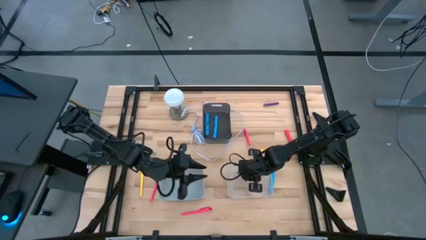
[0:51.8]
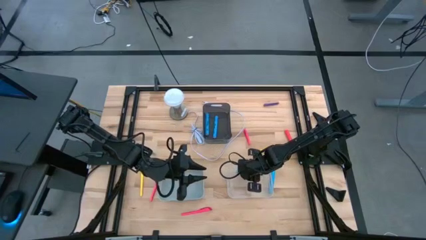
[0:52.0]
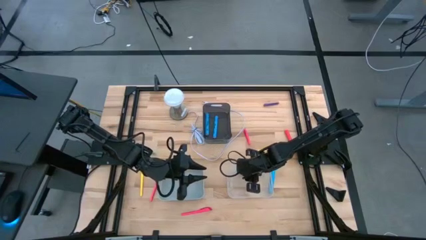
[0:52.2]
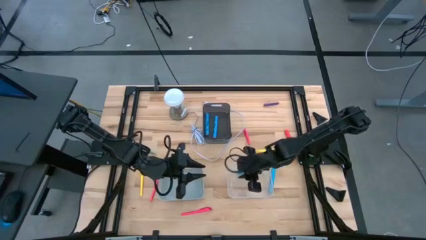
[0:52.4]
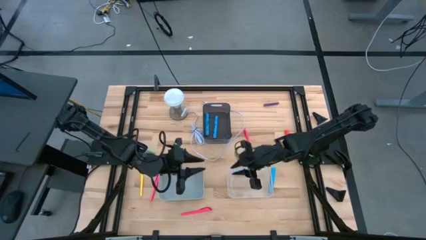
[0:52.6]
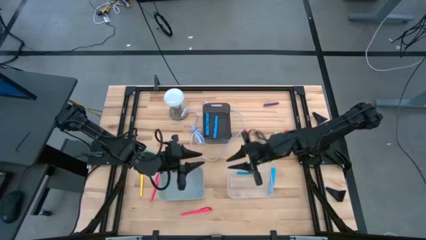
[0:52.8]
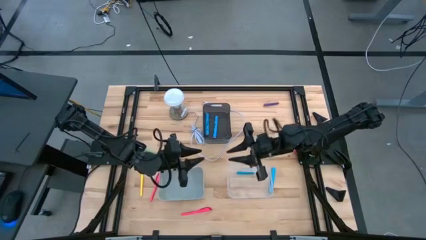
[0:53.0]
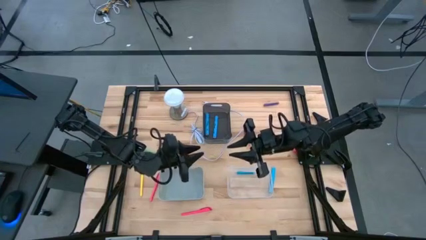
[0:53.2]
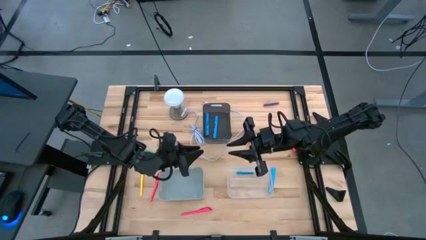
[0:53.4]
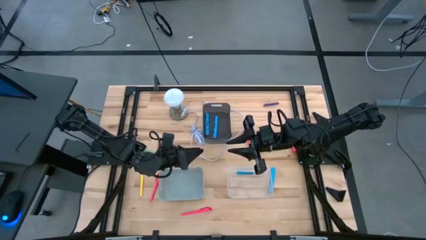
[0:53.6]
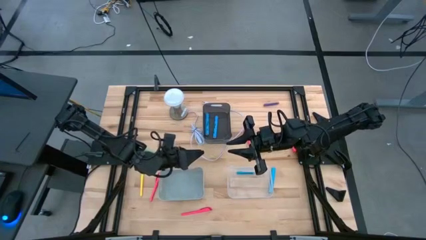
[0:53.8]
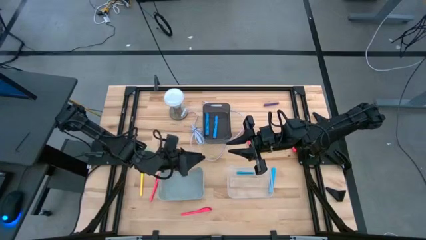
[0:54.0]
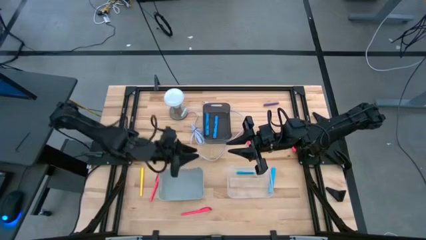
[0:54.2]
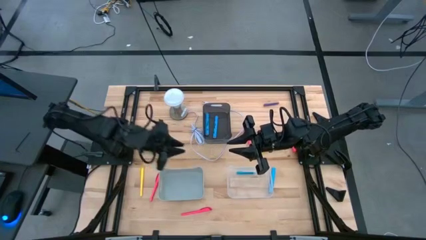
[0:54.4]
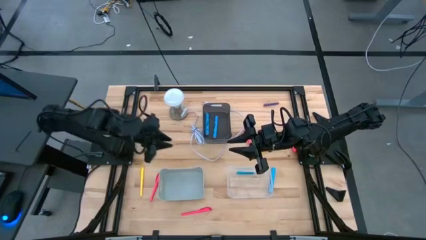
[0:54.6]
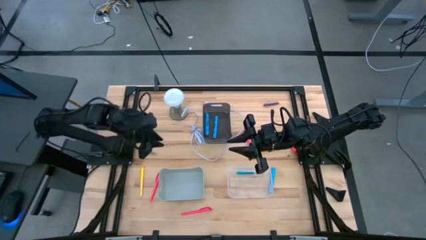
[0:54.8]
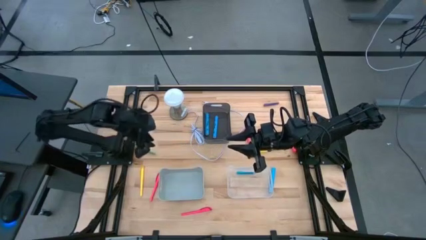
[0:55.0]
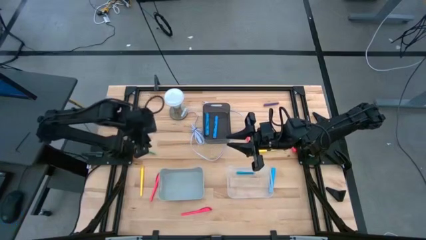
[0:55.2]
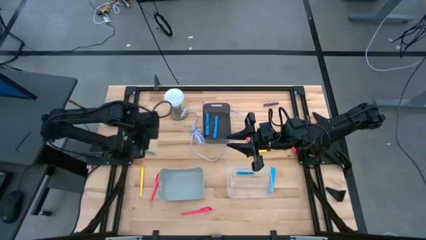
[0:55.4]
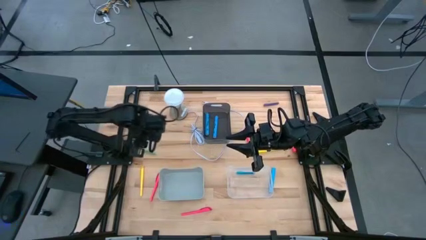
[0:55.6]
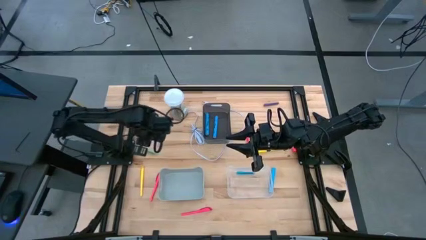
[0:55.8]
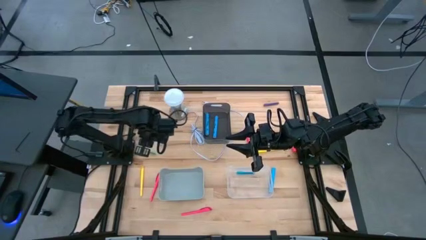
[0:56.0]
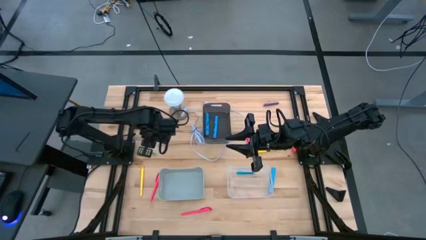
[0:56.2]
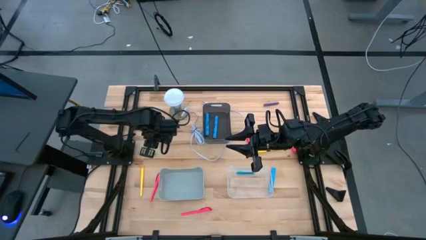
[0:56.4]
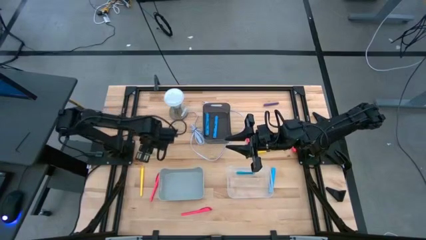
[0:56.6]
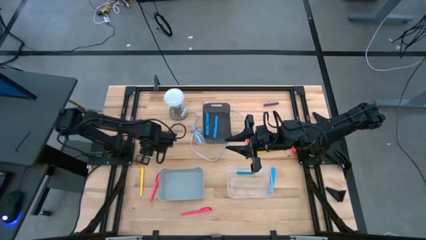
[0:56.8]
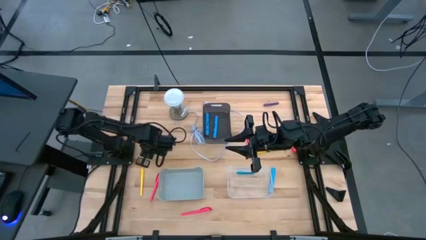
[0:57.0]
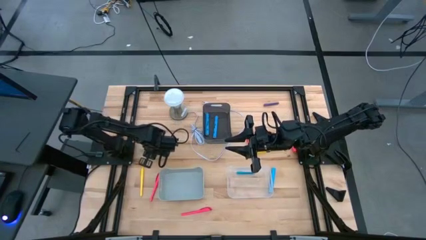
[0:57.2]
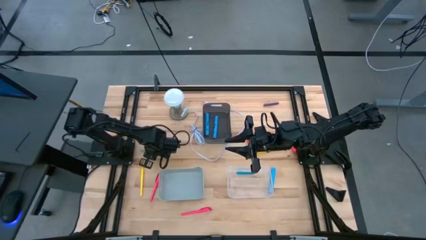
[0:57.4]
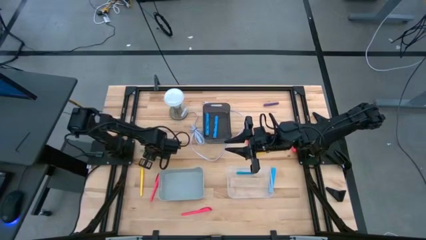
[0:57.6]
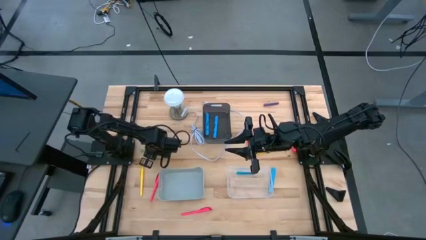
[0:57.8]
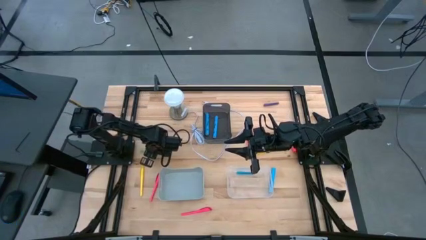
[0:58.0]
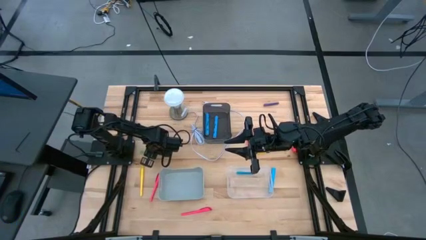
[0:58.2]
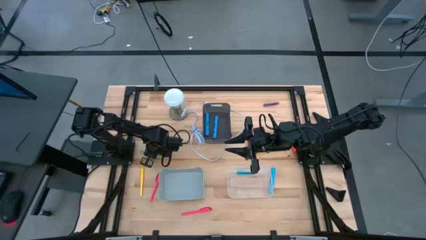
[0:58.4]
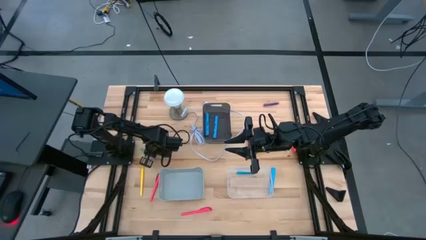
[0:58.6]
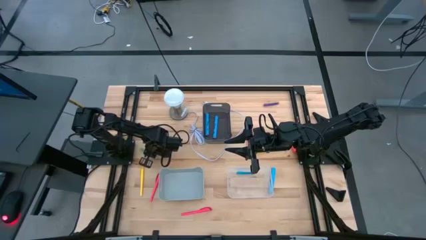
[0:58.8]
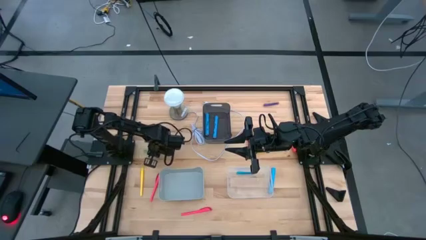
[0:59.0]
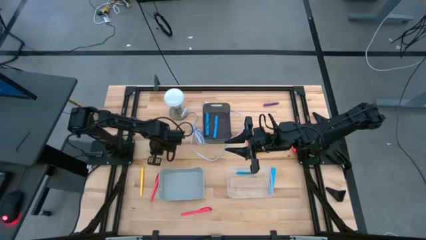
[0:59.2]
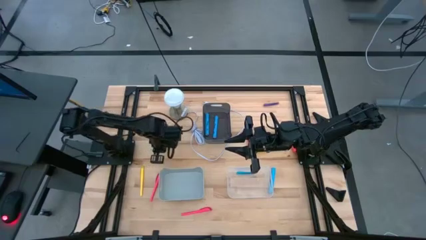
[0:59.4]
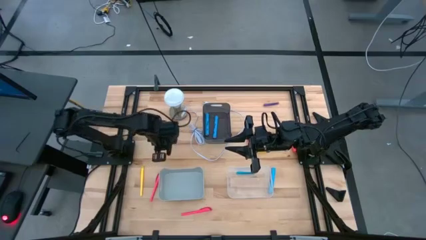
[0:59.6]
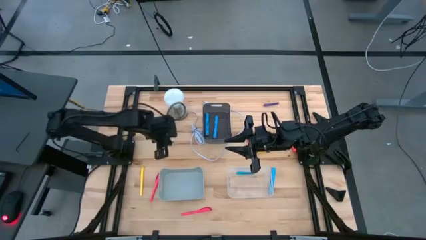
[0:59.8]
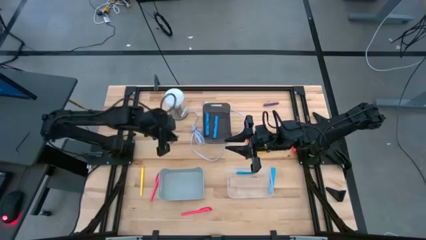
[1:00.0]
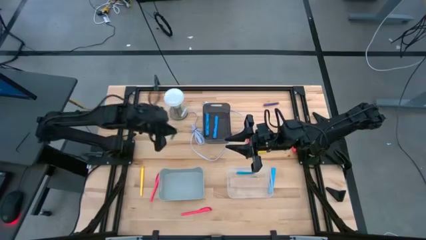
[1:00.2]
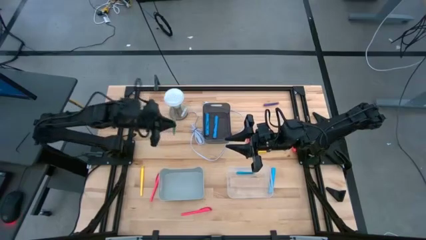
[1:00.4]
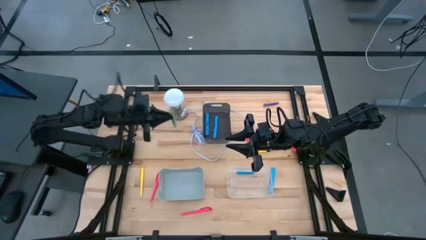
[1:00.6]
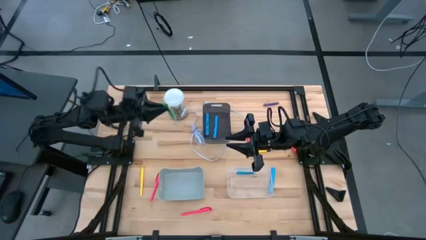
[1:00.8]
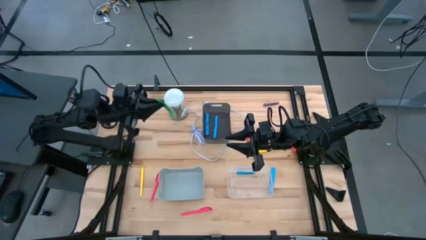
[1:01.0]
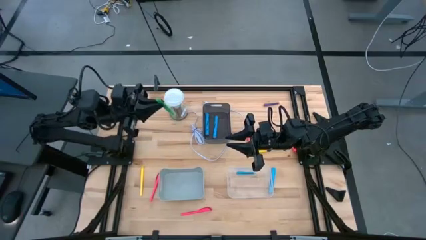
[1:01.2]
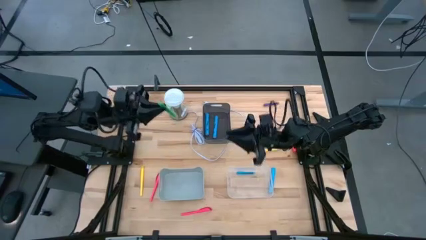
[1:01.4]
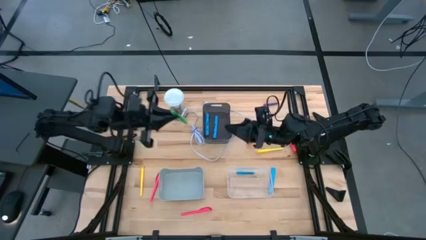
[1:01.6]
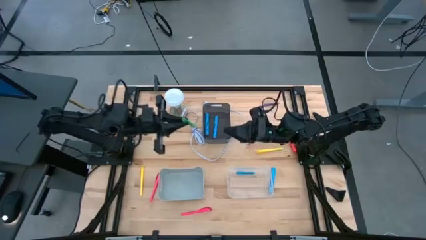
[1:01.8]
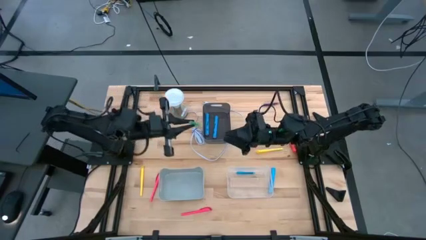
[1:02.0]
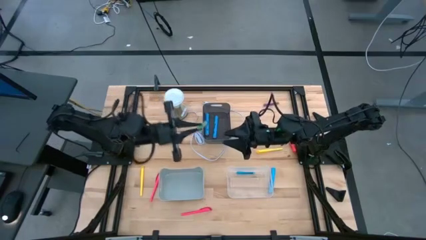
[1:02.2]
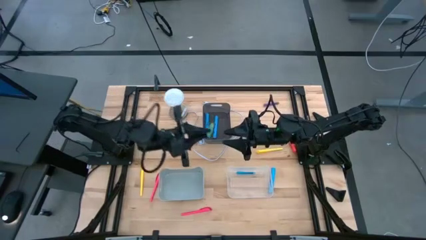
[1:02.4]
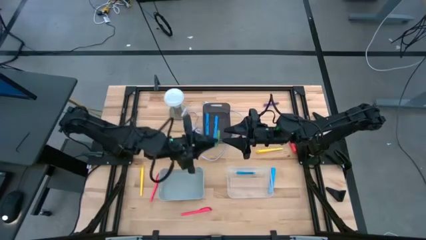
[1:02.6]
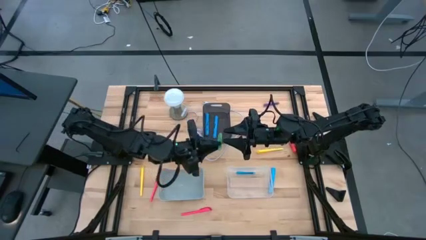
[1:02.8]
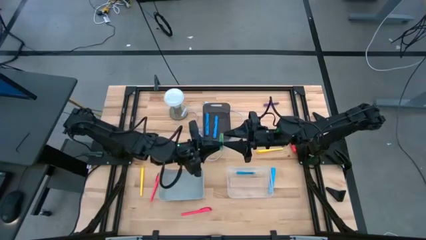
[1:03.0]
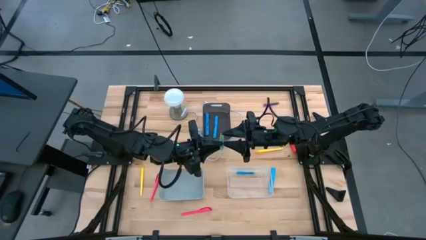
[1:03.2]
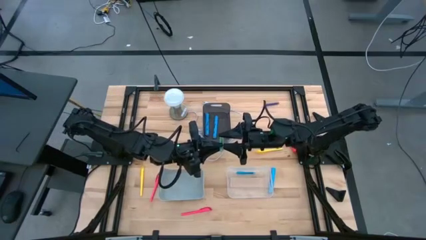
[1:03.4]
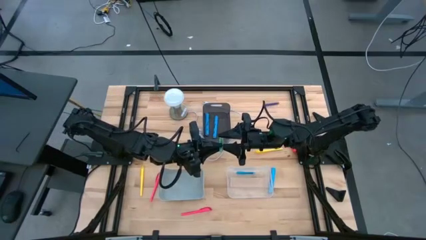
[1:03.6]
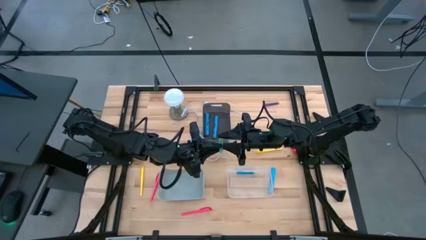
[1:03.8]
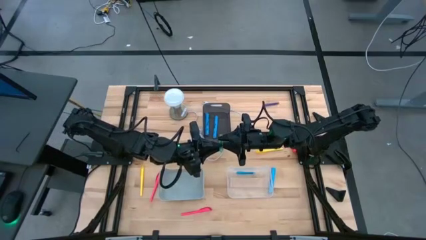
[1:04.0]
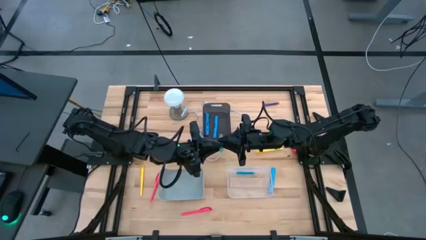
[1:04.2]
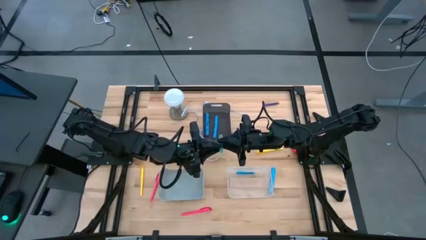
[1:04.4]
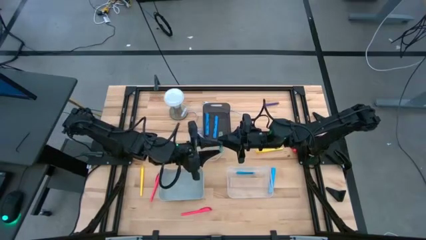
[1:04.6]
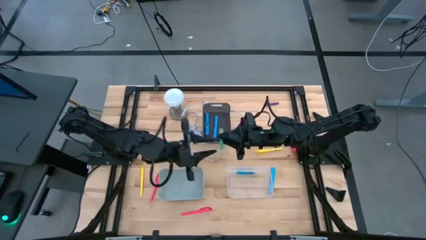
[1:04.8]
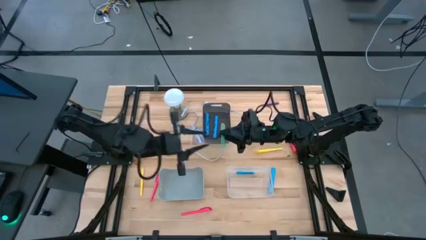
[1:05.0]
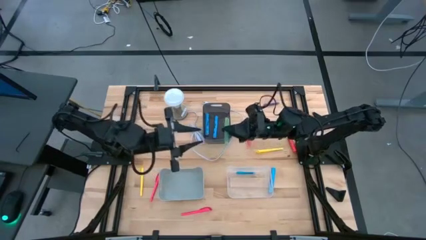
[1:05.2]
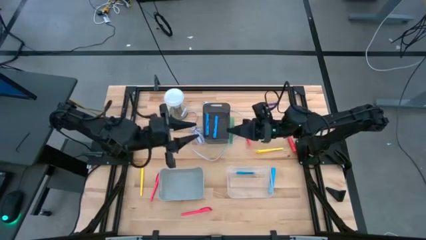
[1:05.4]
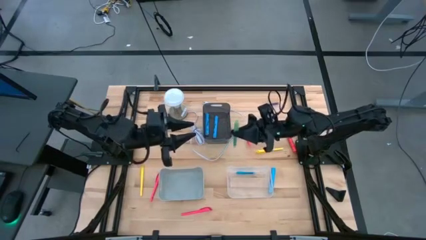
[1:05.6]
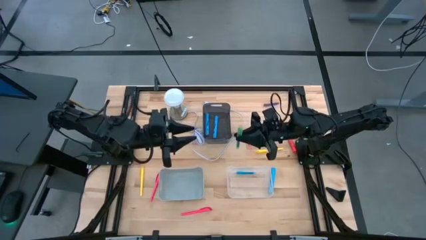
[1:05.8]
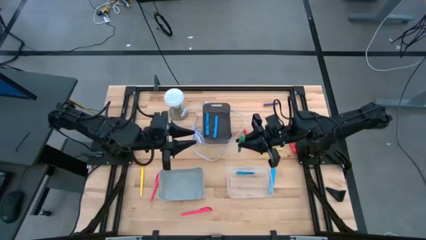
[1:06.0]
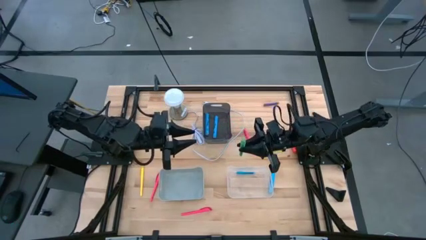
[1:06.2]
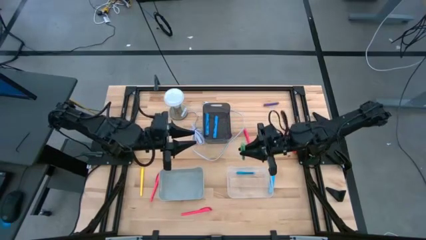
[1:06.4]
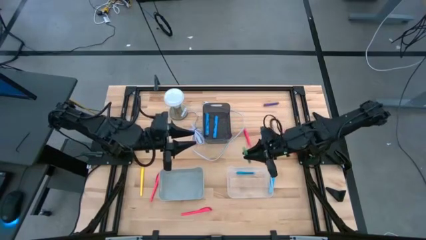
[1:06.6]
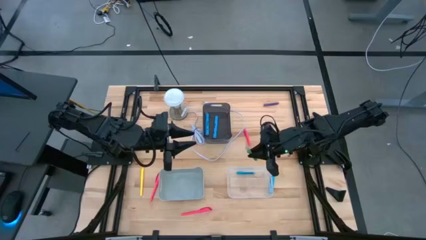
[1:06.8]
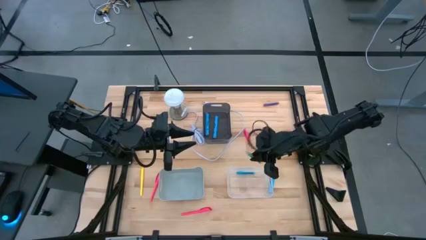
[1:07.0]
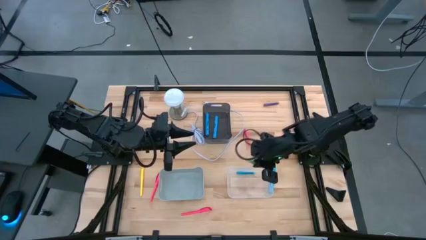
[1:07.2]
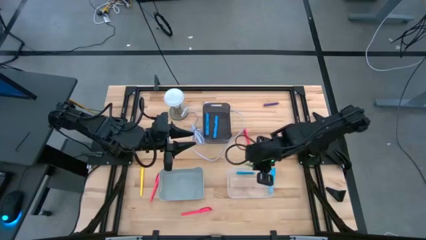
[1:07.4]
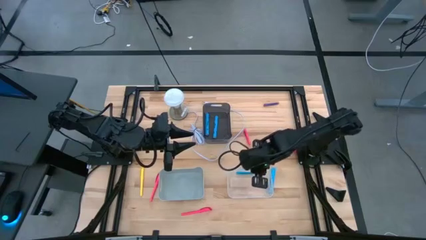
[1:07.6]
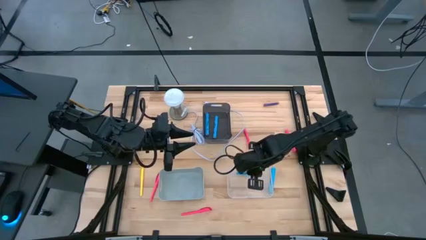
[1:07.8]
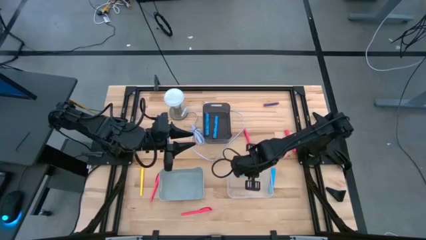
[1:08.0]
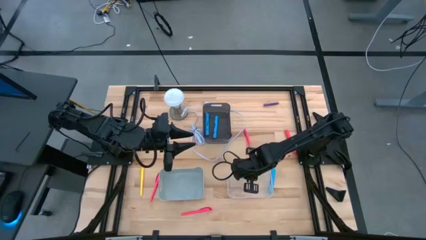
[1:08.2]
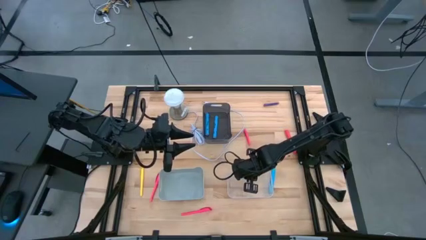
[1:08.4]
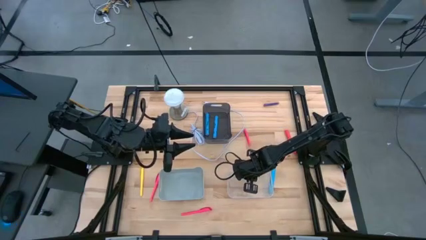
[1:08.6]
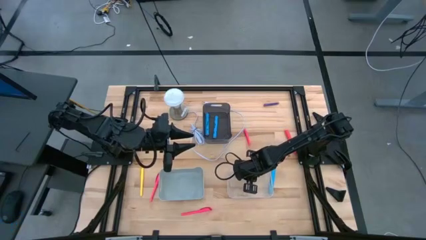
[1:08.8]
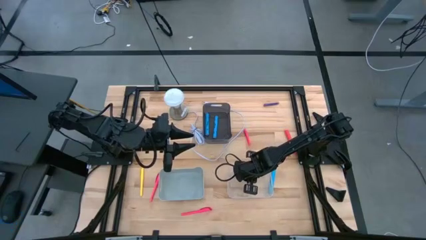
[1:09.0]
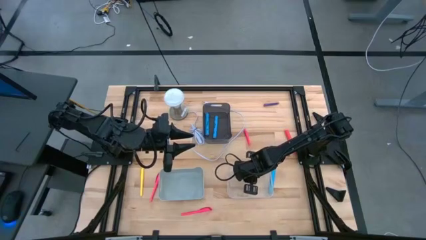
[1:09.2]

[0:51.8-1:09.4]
Task: Pick & Place Markers
Put the green pen into the transparent bin
